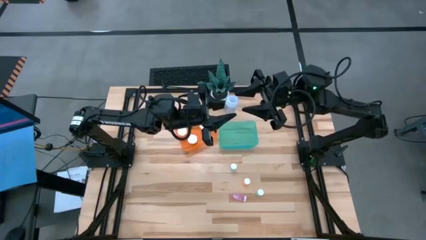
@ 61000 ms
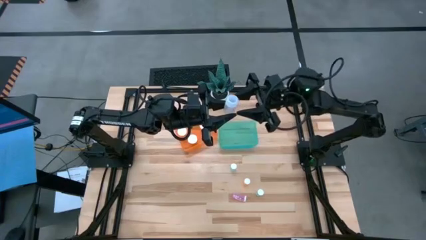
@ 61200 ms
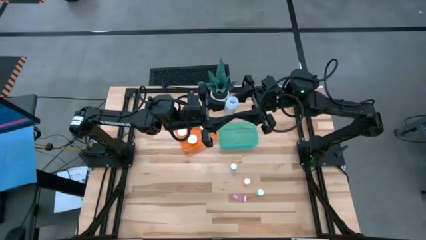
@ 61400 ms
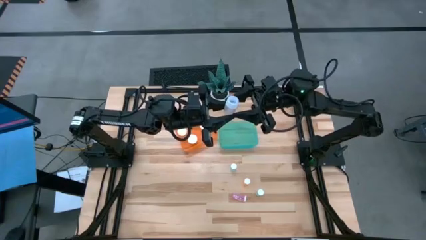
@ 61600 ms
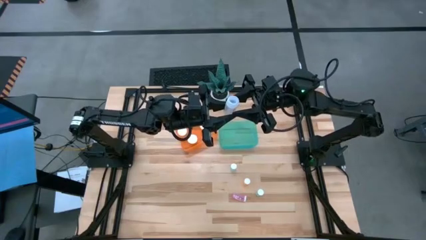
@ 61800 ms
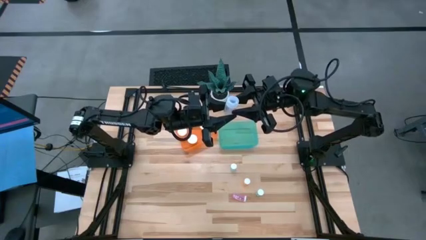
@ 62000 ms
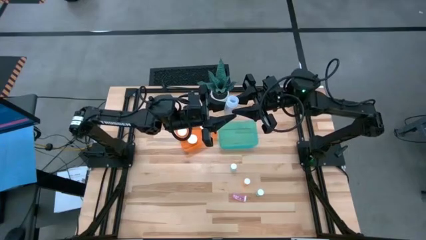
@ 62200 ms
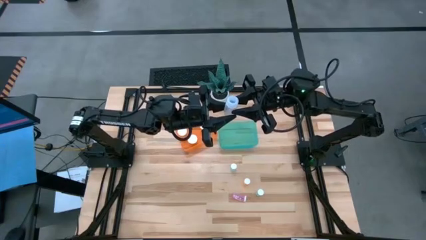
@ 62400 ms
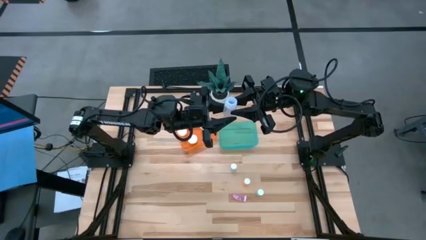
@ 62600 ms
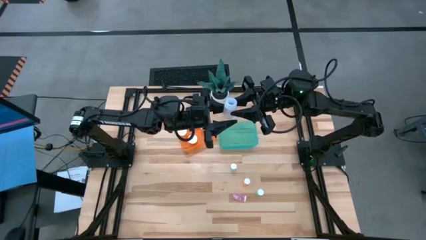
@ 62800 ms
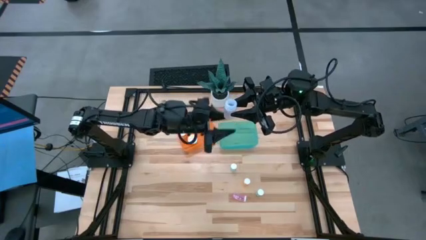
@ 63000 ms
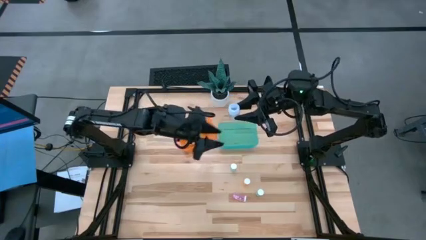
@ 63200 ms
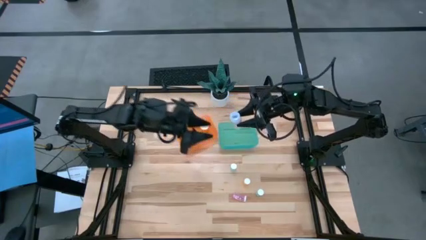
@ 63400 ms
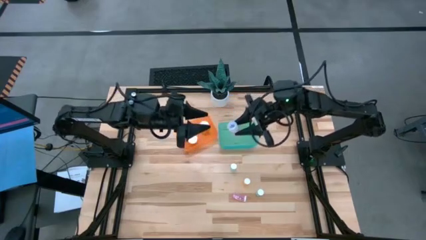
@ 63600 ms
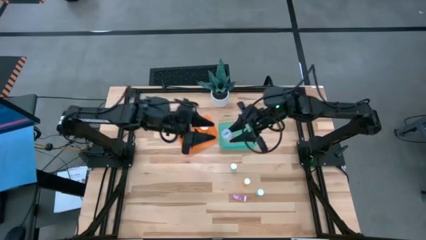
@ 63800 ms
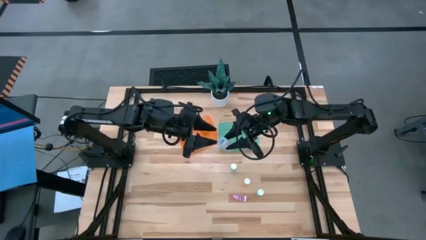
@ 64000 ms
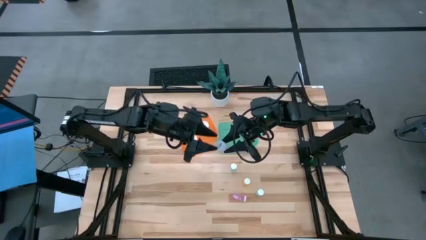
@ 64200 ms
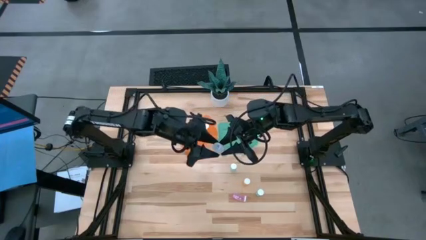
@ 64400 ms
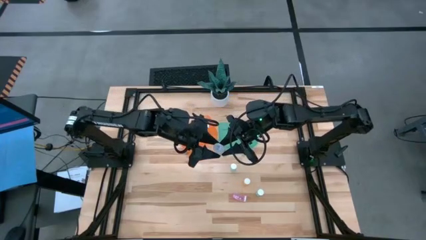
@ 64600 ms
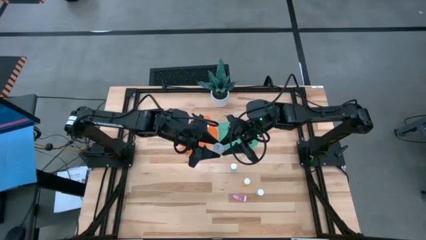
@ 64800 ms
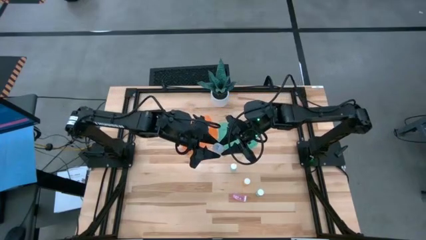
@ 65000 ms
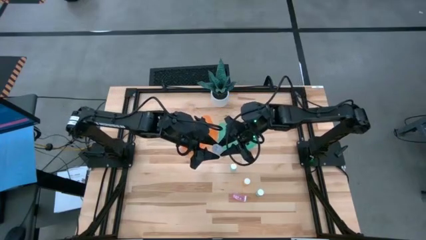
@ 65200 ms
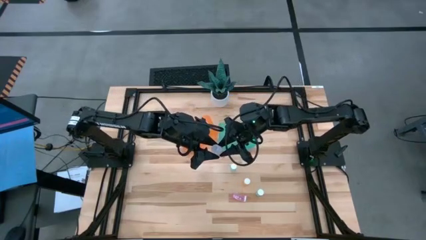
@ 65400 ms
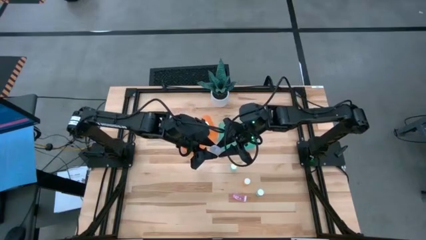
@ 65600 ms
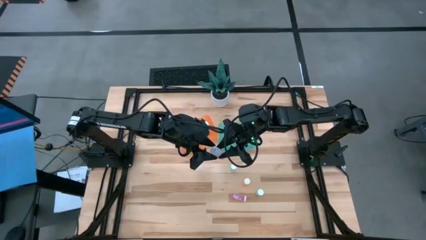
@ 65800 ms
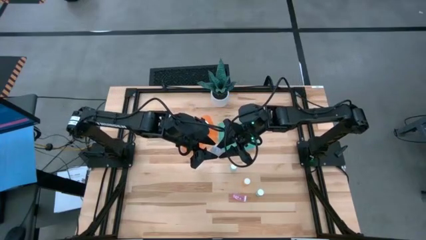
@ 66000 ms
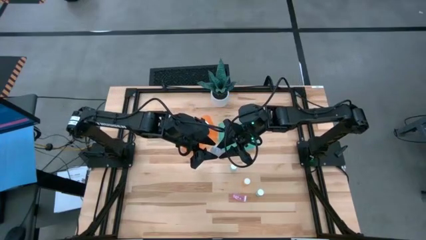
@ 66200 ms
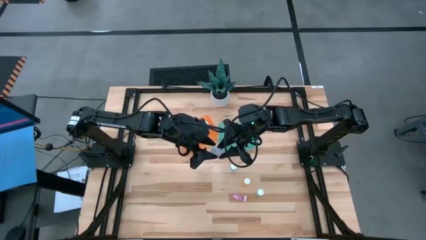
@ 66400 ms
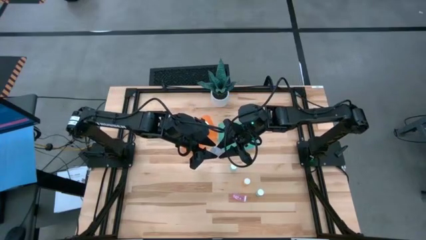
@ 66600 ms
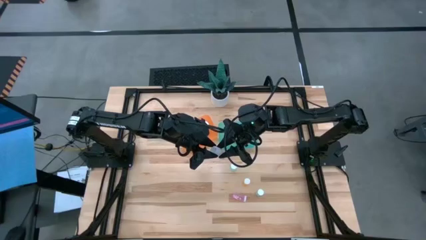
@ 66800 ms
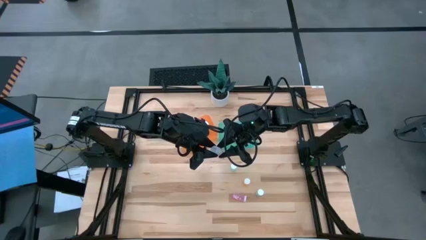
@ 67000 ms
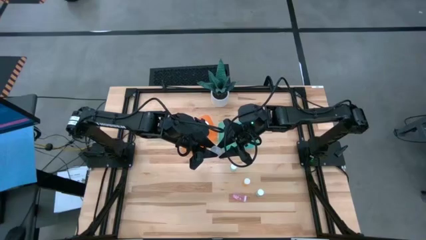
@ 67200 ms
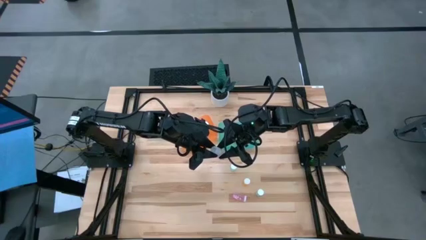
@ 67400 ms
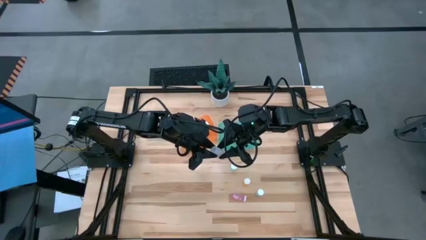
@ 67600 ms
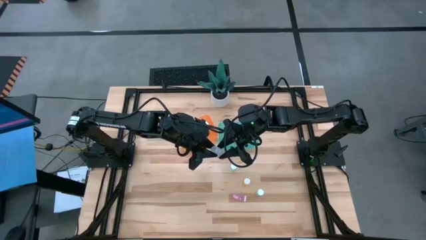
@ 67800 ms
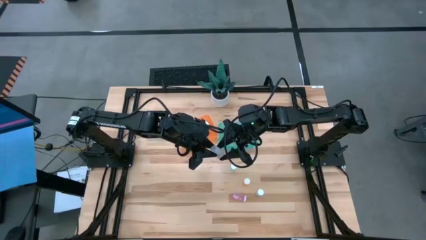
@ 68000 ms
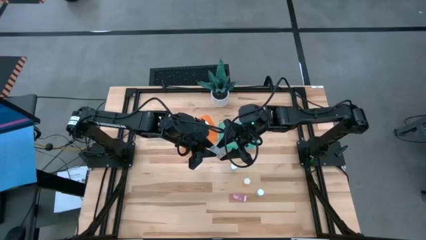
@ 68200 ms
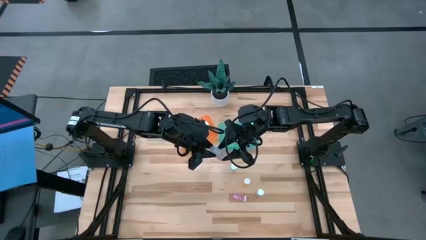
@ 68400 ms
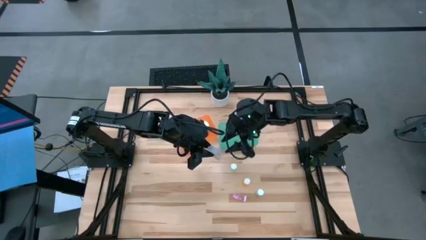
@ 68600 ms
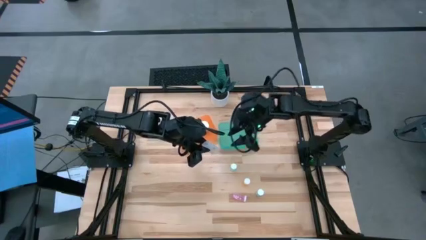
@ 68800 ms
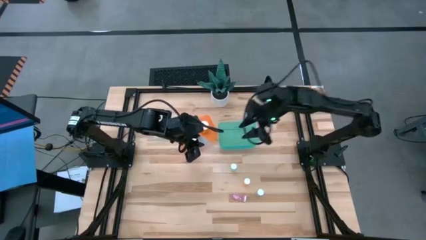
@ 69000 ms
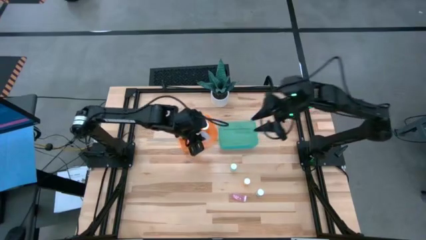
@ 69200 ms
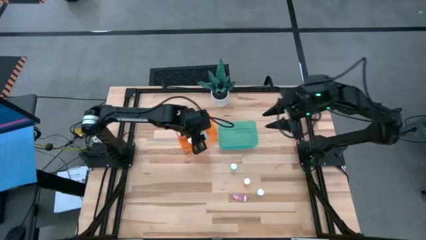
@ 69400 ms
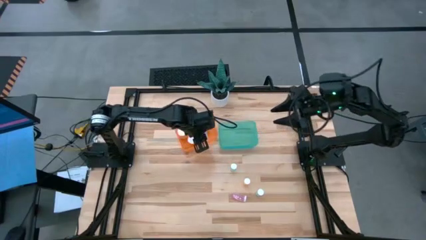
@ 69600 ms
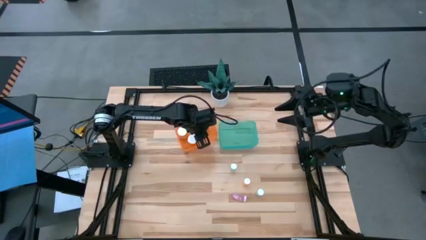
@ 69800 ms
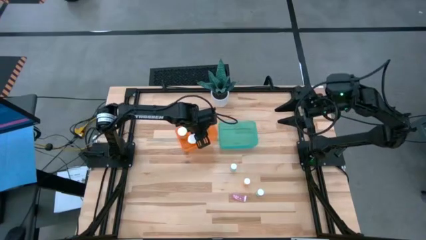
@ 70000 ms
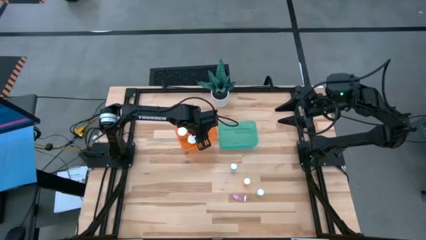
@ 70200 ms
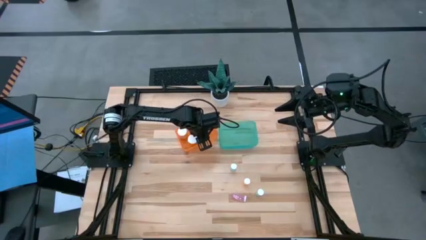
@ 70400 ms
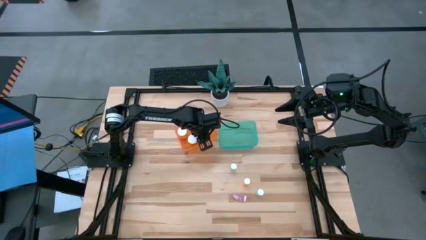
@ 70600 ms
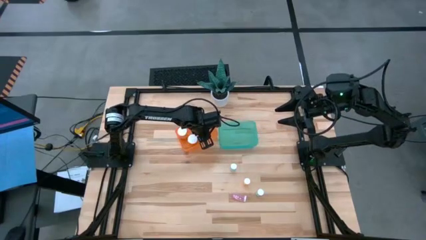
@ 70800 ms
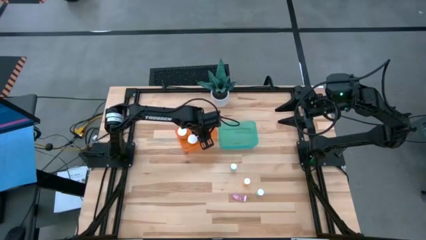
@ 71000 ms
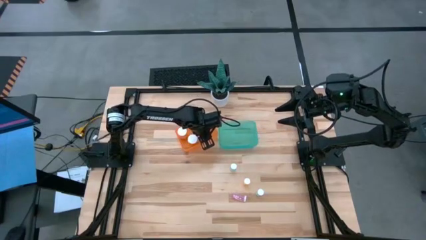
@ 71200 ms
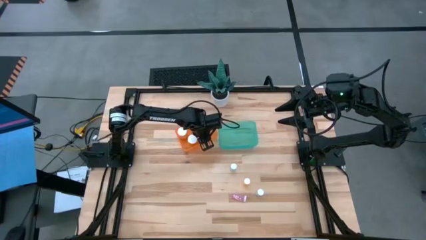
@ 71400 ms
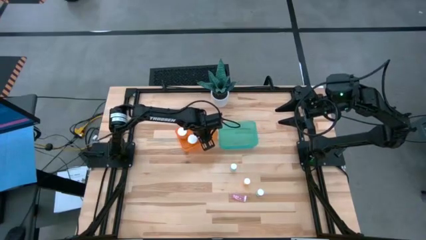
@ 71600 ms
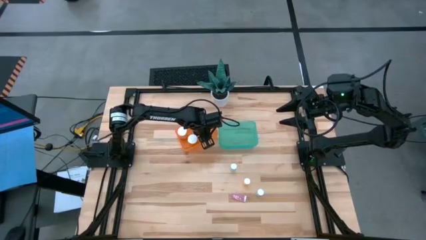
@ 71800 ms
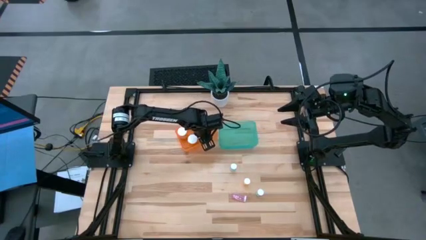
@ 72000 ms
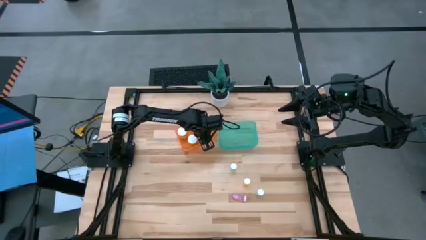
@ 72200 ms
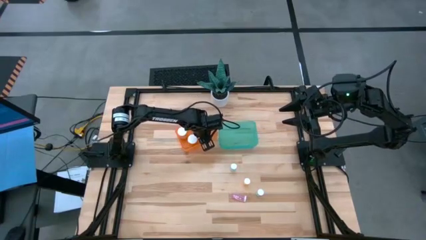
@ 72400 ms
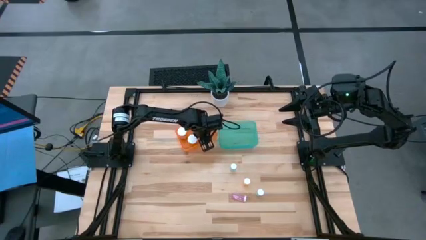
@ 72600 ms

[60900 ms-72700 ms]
Task: Pick and place medicine bottles into bin by pill shape (circle, oval)
Put the transparent capsule bottle into the orange bin
